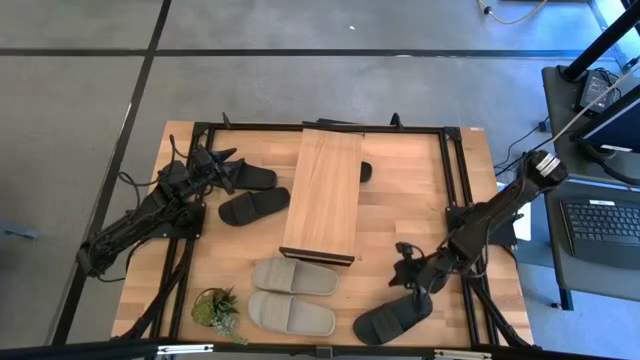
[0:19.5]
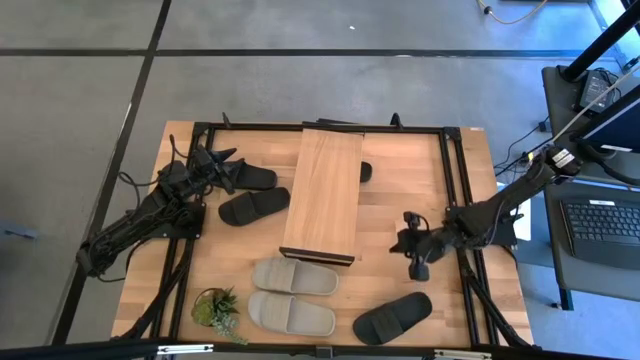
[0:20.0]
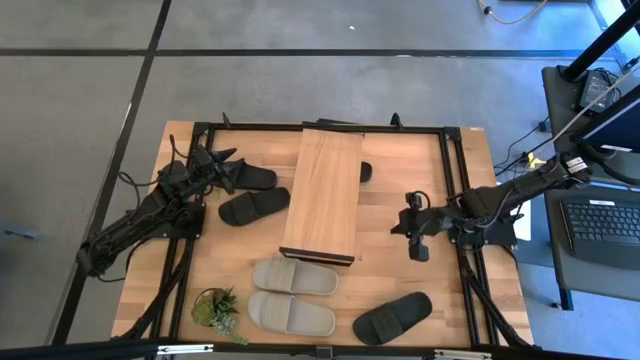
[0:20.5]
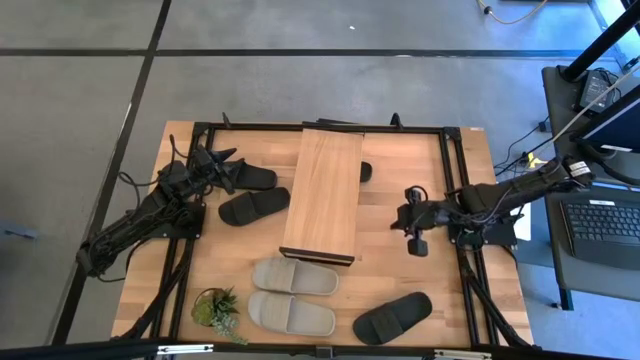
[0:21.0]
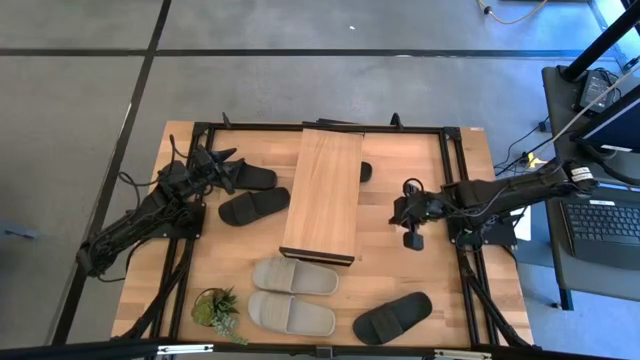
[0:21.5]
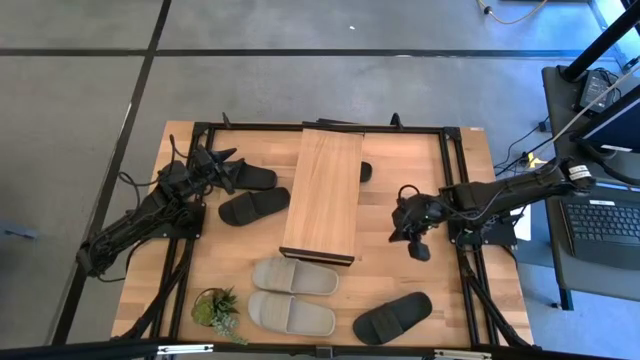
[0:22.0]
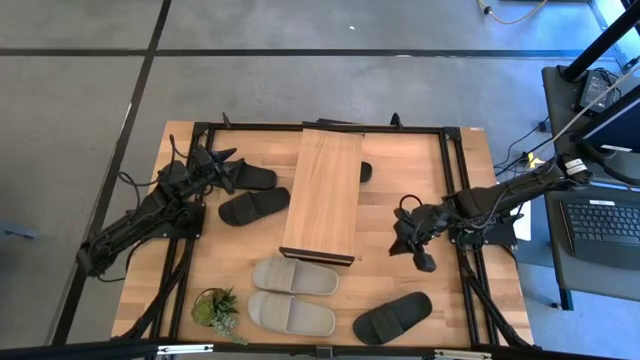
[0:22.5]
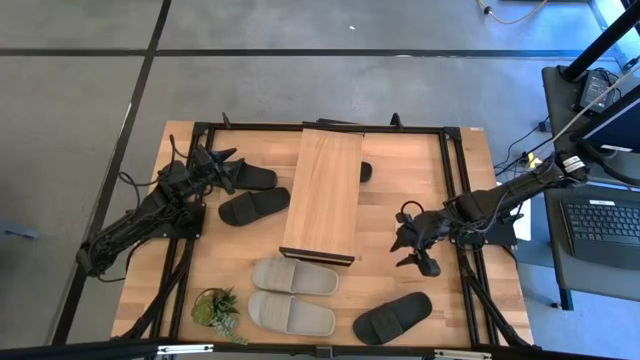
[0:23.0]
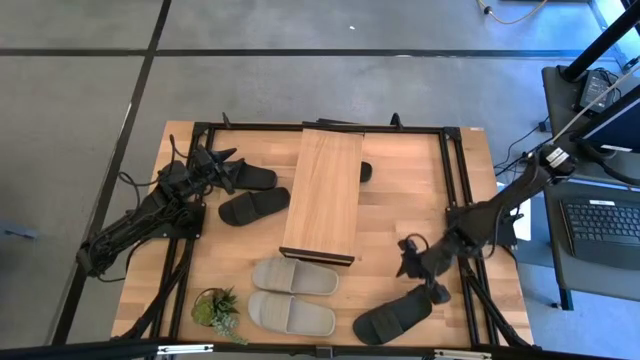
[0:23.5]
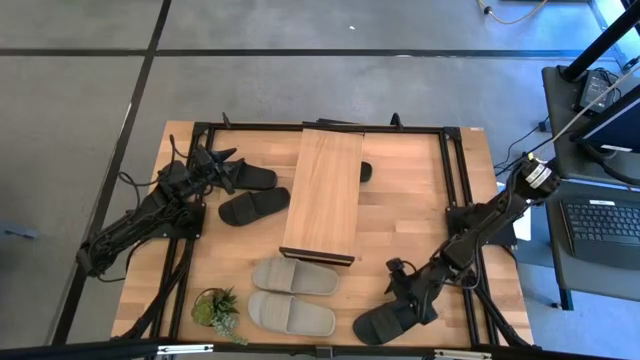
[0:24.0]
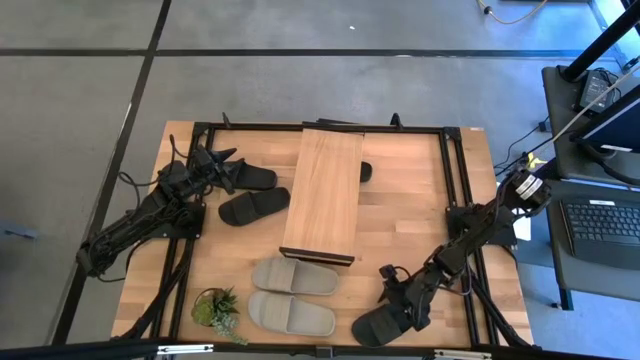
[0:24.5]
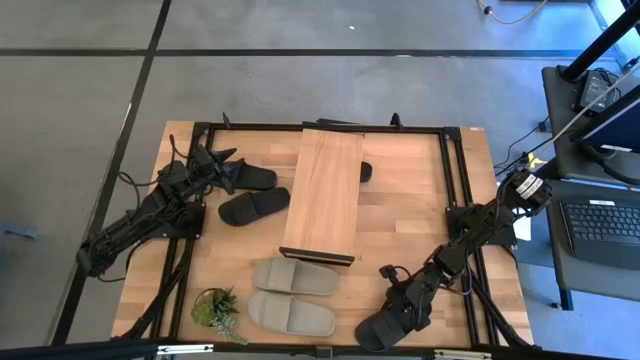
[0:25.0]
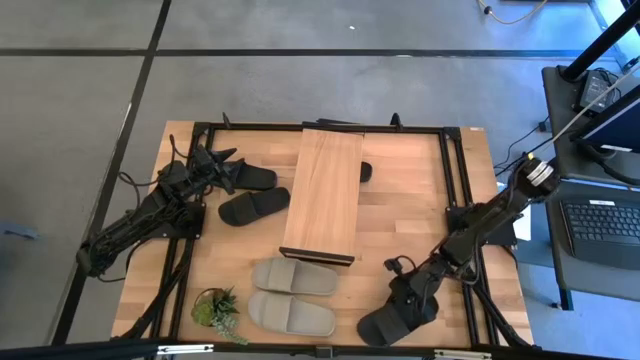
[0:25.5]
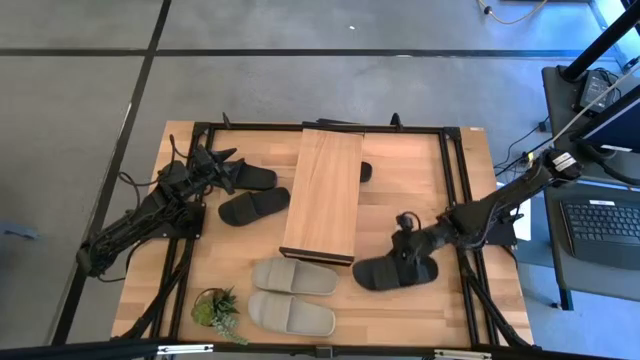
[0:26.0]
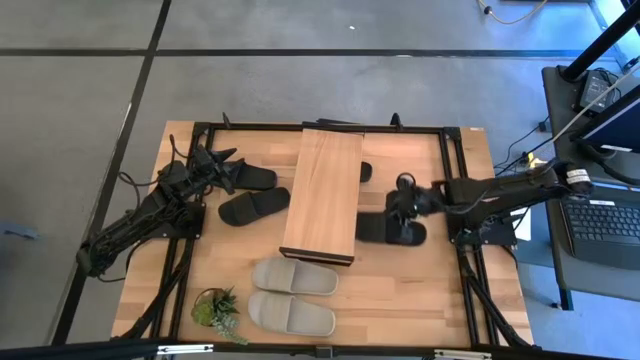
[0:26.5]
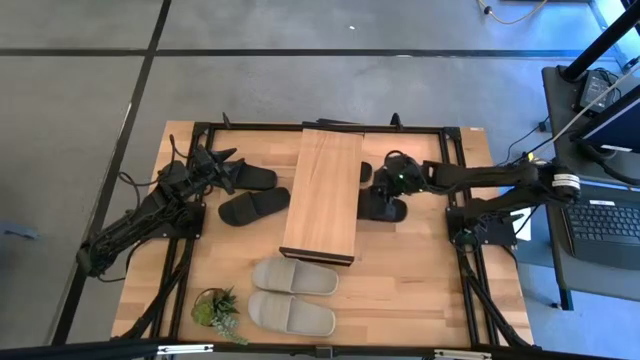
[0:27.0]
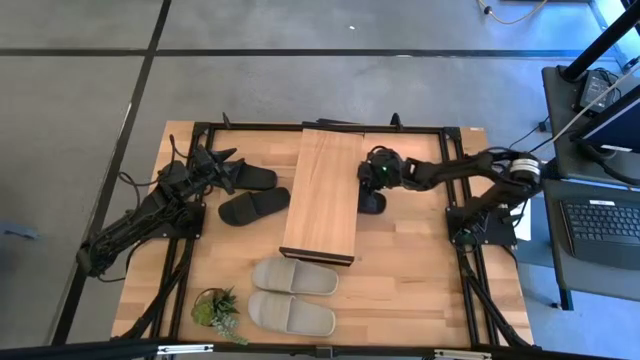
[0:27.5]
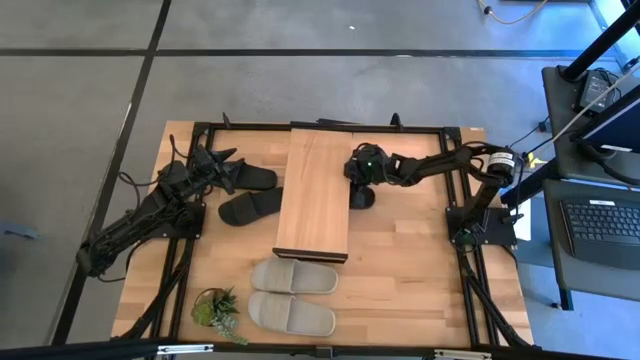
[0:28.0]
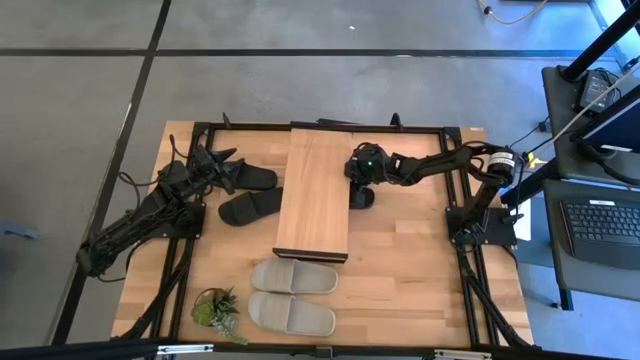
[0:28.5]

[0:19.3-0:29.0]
Task: Pick and place slides into the shelf
Put the bottom right black slide under the shelf

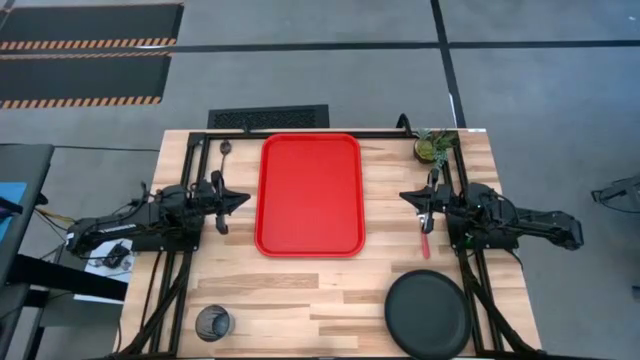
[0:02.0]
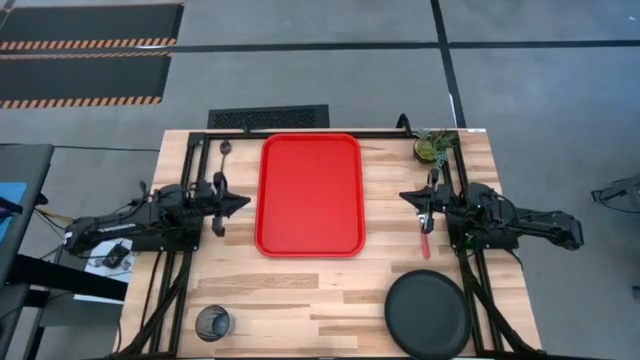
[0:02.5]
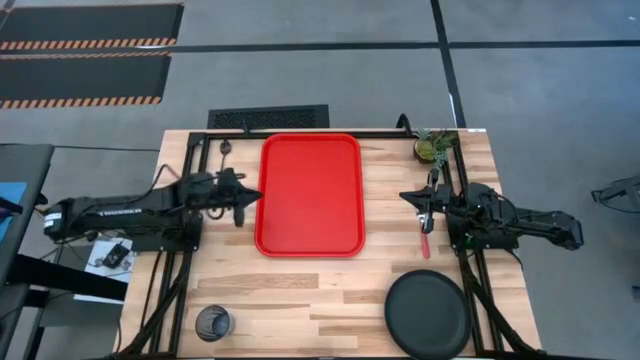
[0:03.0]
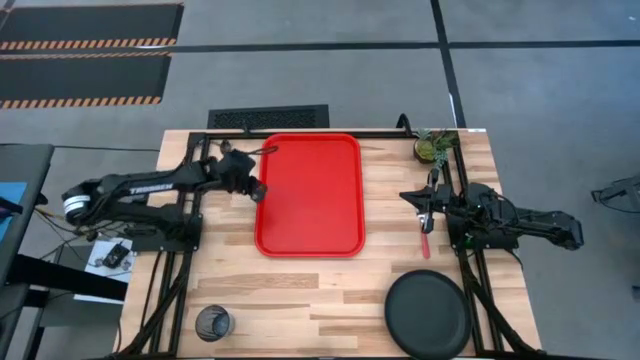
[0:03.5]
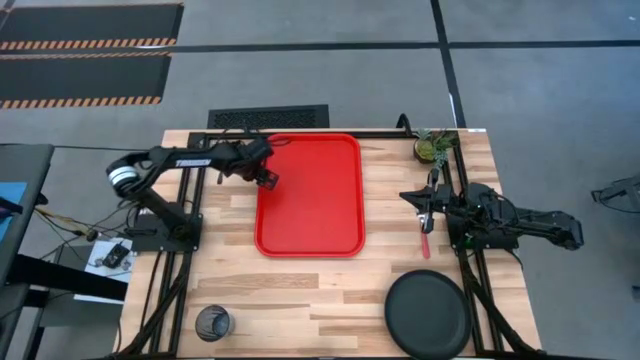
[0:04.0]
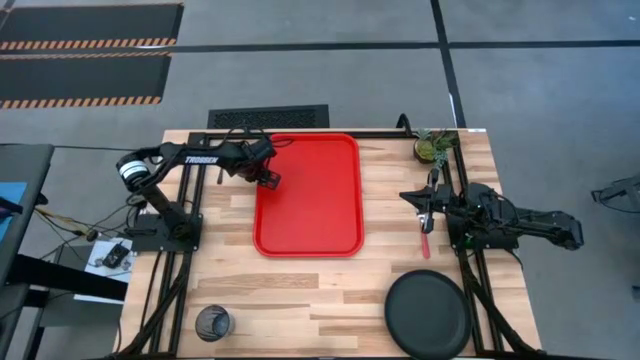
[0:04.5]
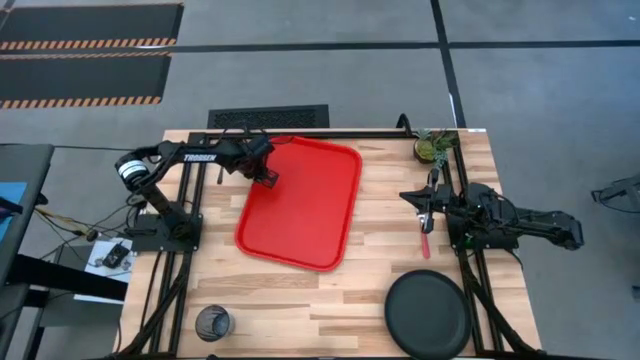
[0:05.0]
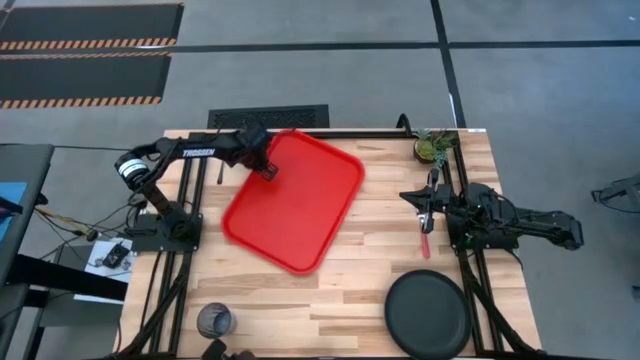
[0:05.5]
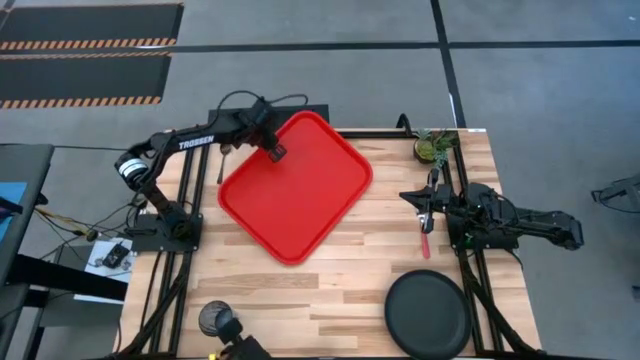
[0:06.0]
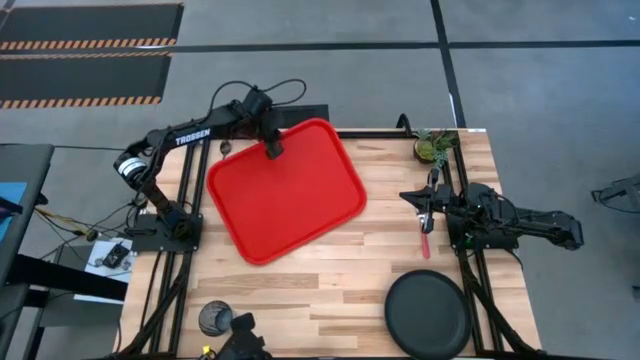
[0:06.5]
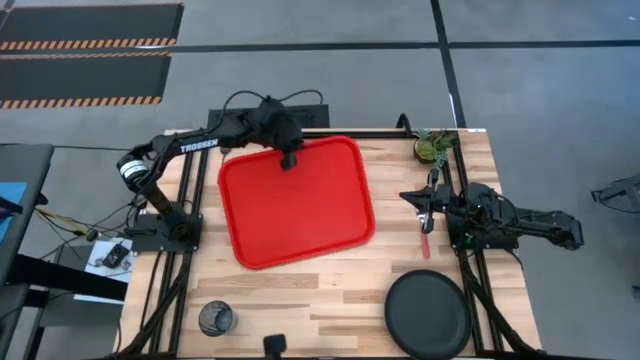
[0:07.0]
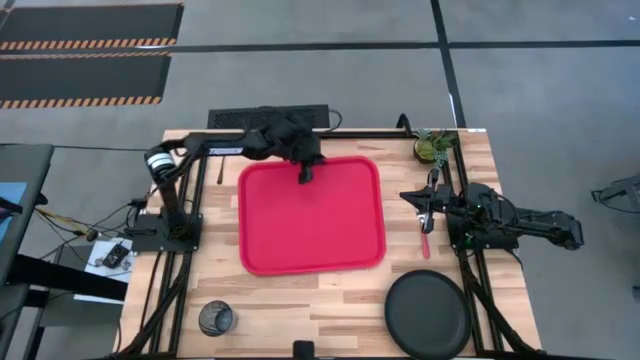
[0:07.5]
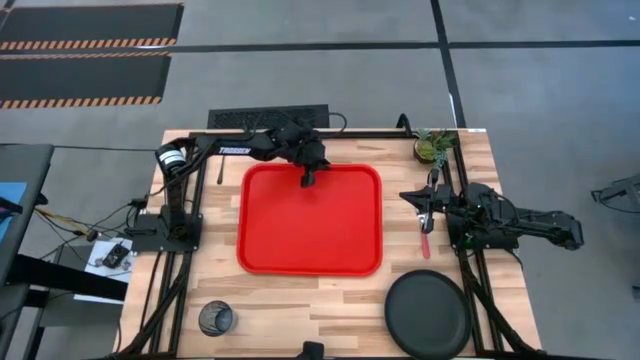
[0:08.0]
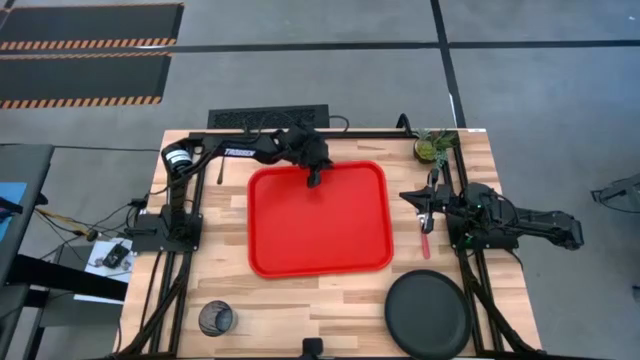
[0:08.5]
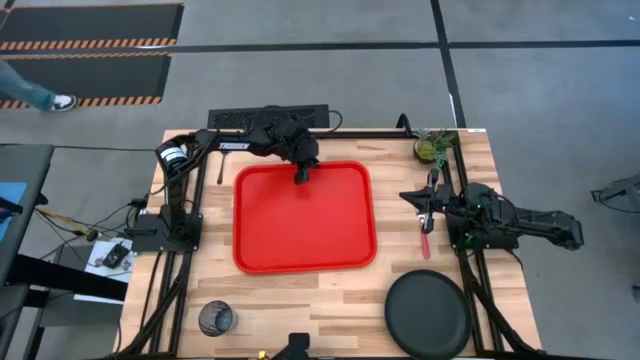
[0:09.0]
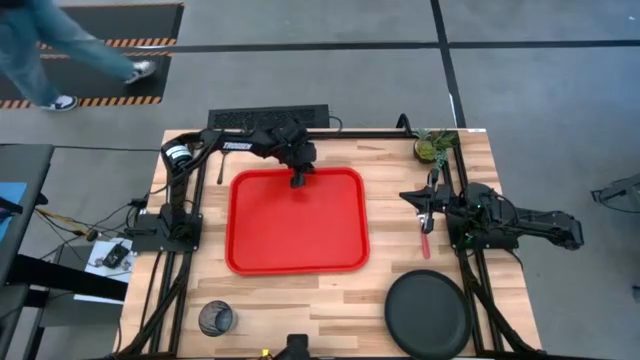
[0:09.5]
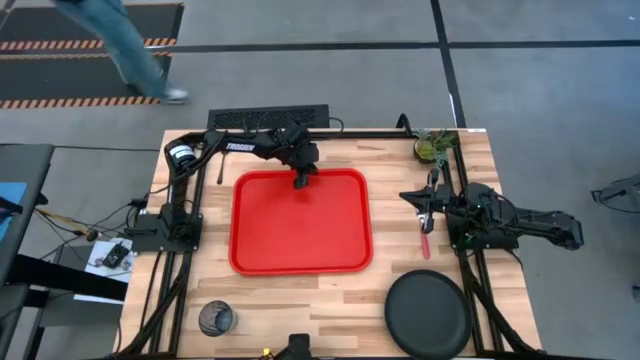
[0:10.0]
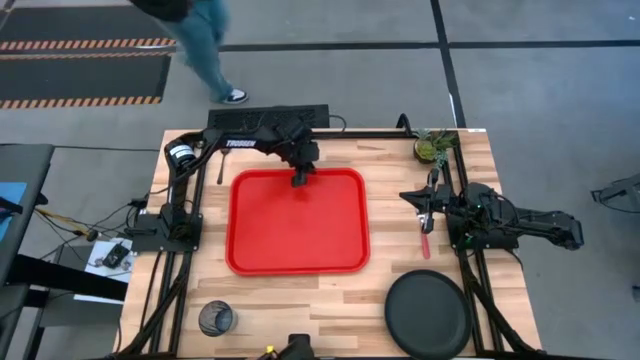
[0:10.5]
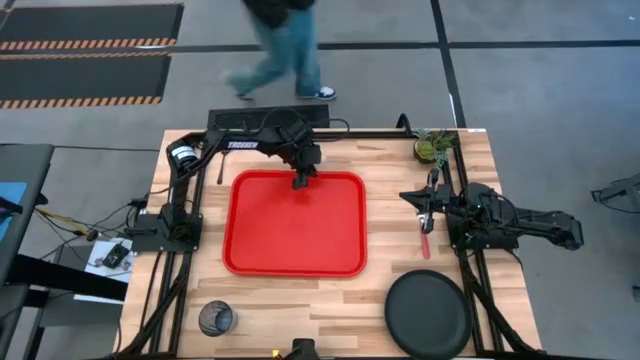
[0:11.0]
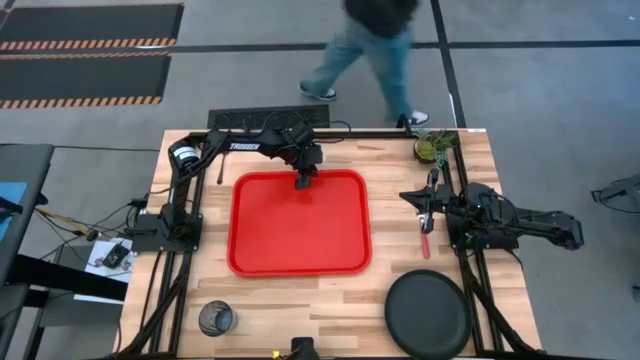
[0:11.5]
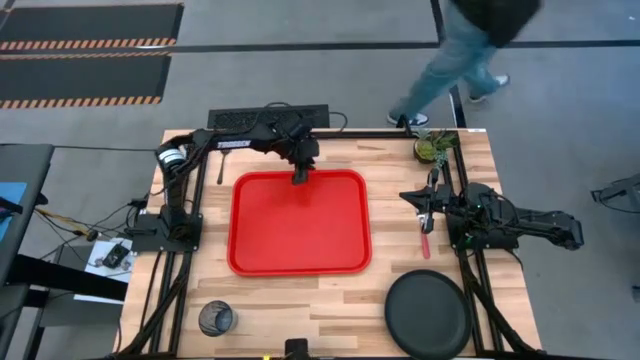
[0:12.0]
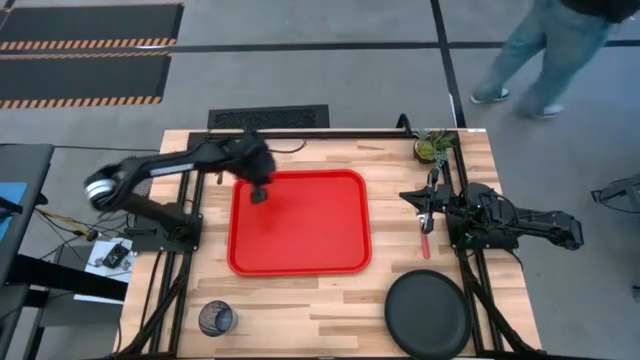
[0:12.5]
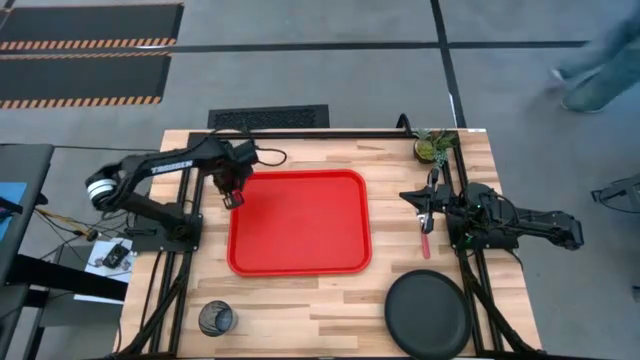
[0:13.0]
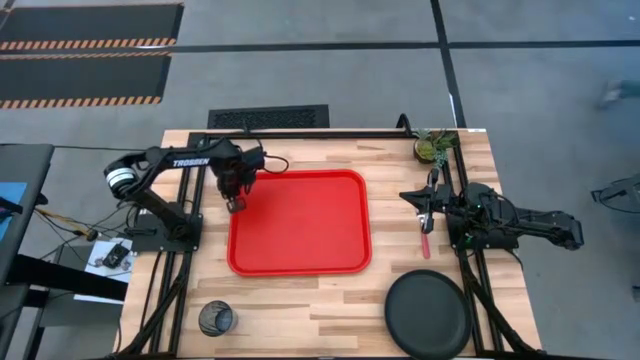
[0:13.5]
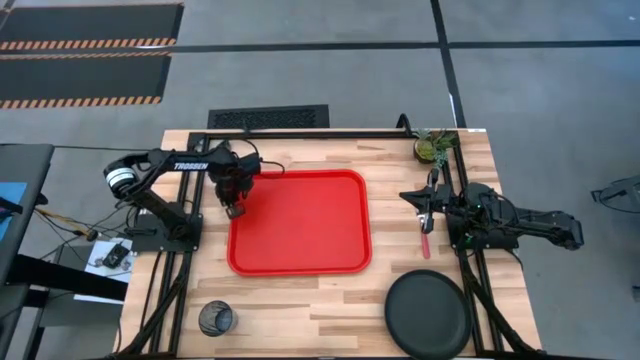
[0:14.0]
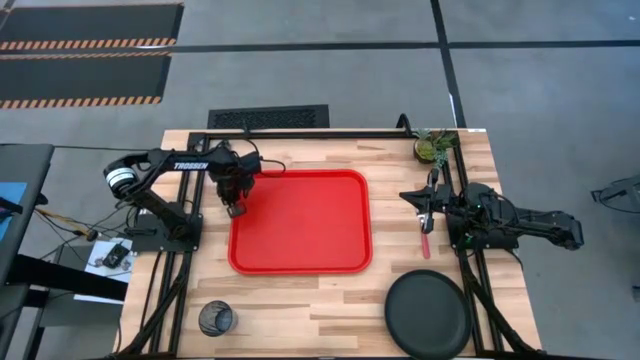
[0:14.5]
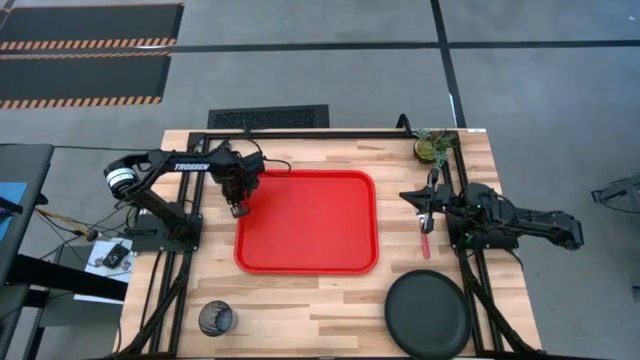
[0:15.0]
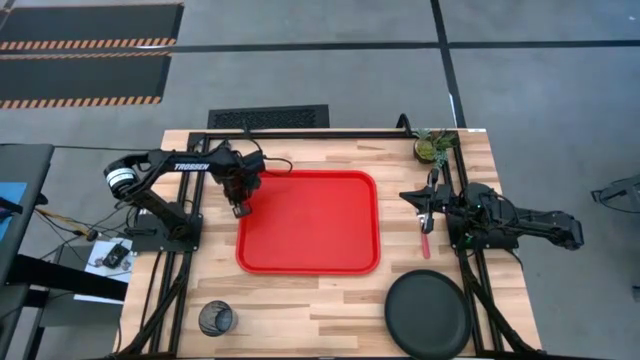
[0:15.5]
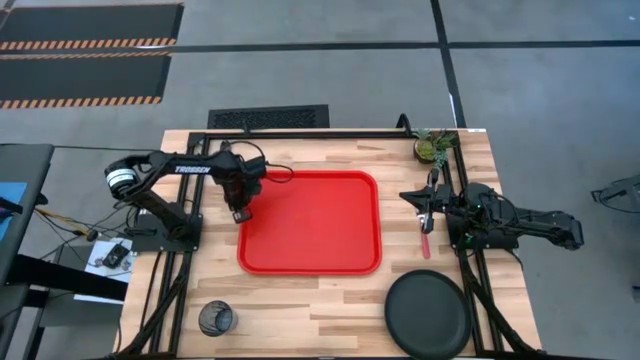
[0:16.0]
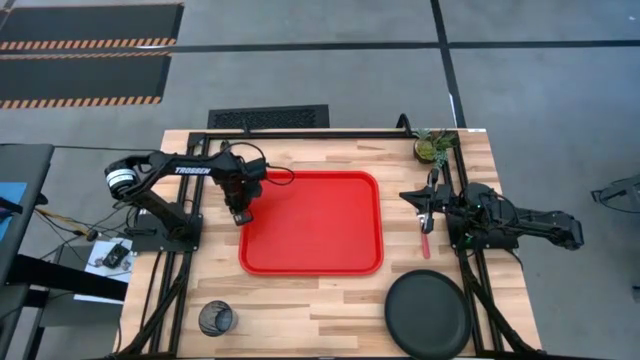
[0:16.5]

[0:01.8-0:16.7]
Task: Pick and place plate/cup/fork/spoon on tray
Move the red serving tray to the center of the table
